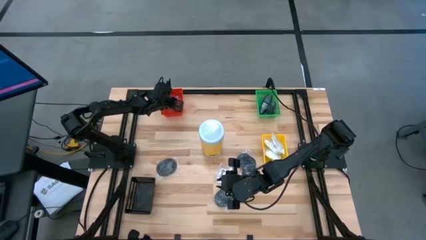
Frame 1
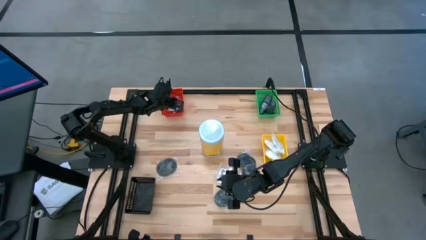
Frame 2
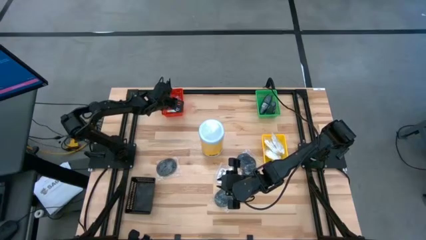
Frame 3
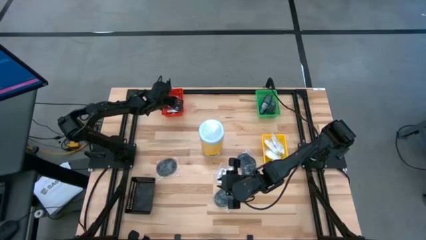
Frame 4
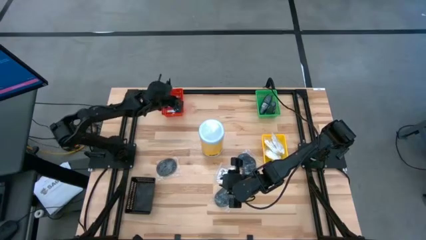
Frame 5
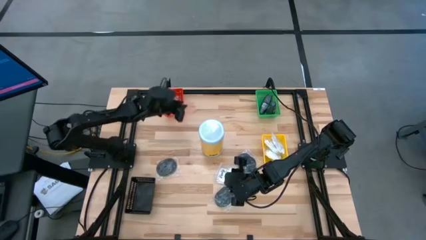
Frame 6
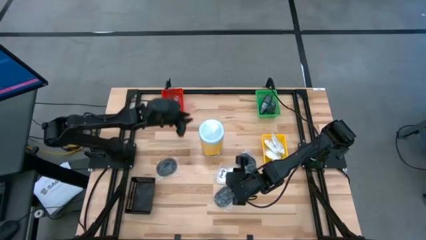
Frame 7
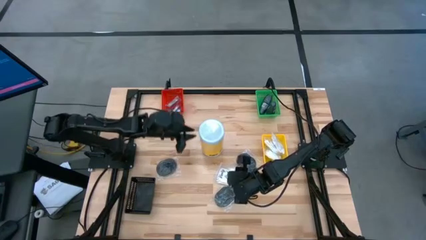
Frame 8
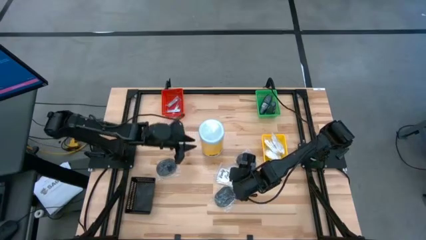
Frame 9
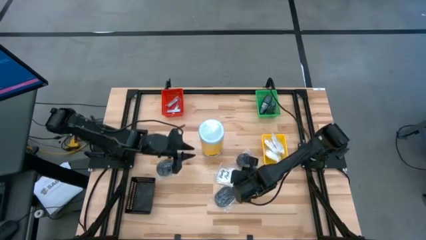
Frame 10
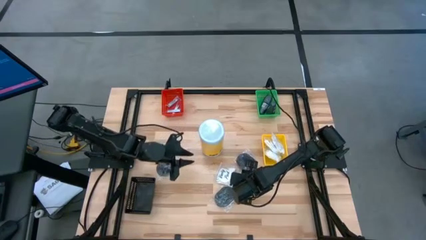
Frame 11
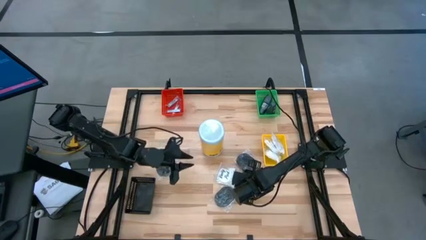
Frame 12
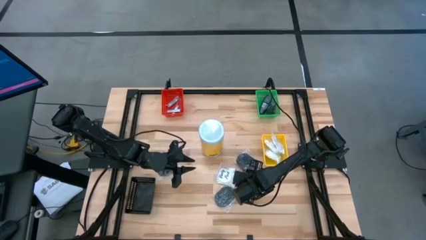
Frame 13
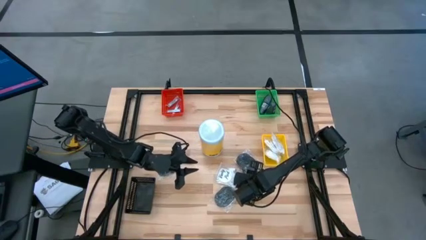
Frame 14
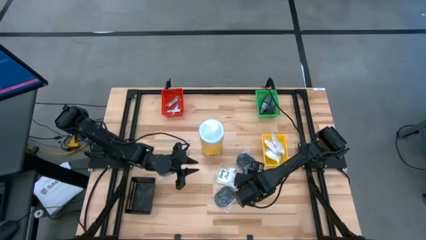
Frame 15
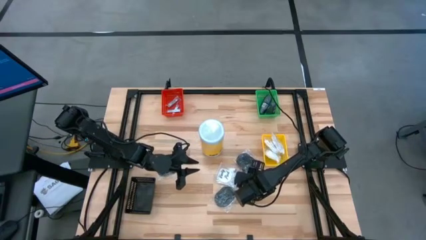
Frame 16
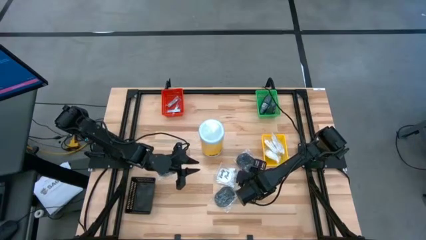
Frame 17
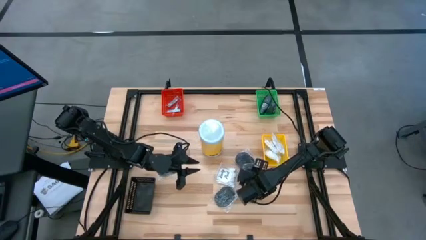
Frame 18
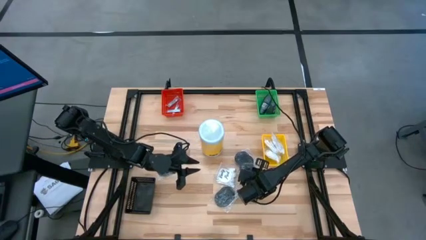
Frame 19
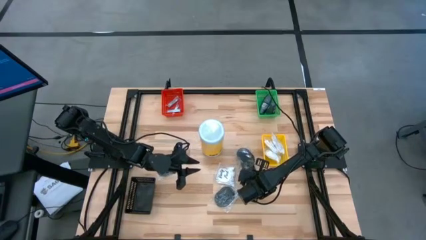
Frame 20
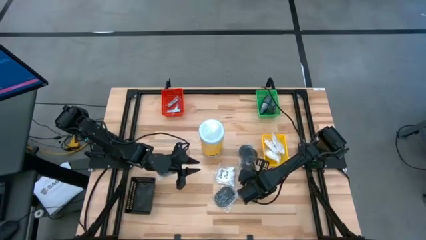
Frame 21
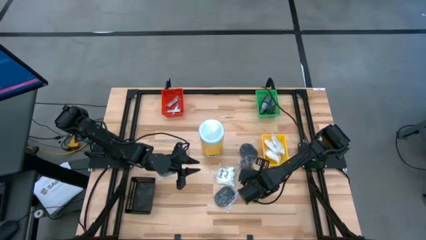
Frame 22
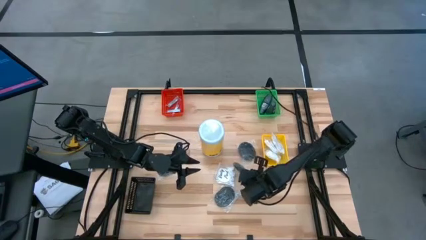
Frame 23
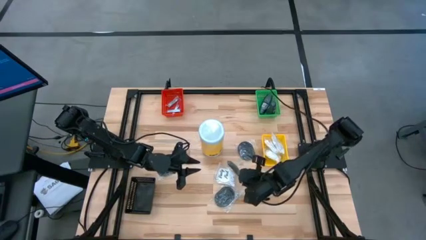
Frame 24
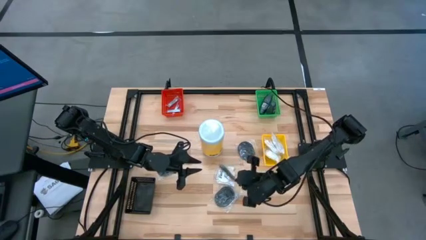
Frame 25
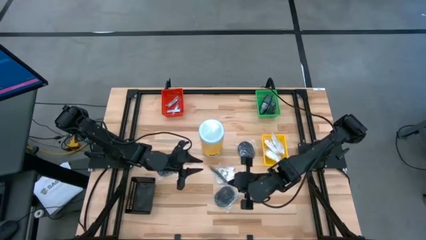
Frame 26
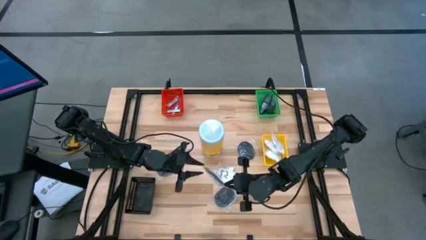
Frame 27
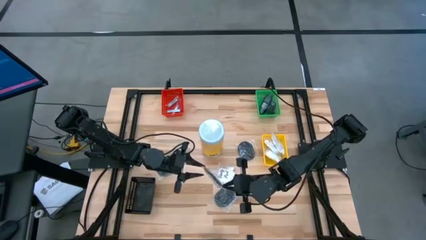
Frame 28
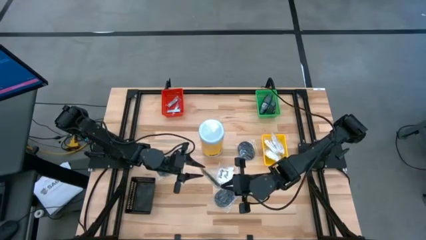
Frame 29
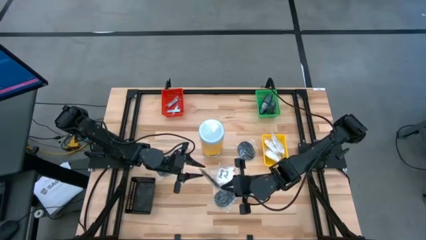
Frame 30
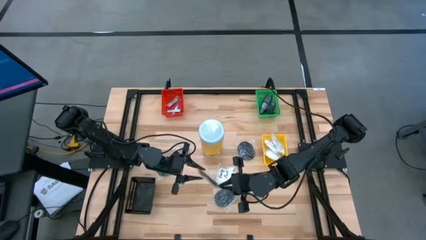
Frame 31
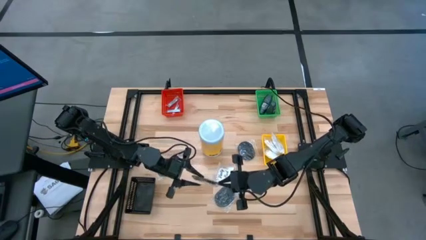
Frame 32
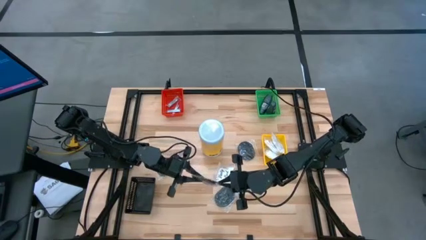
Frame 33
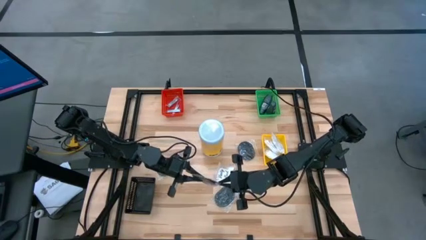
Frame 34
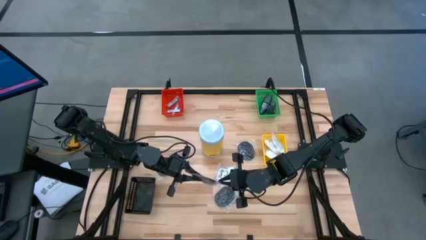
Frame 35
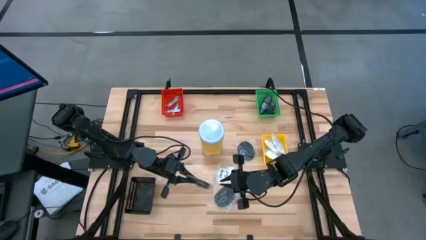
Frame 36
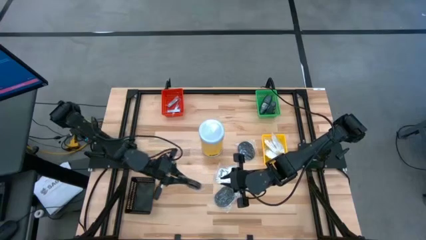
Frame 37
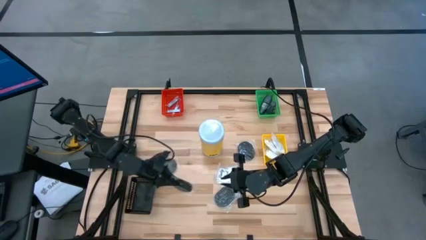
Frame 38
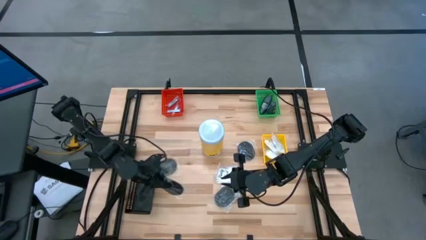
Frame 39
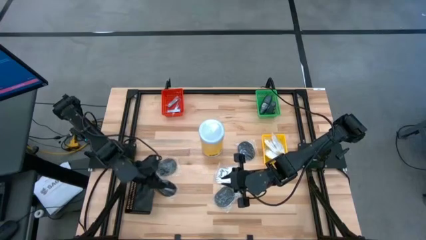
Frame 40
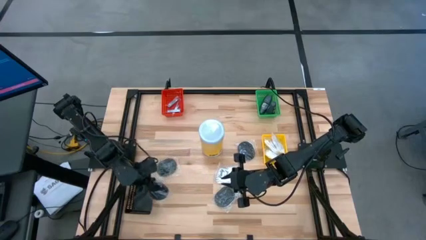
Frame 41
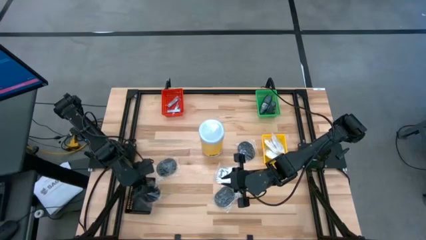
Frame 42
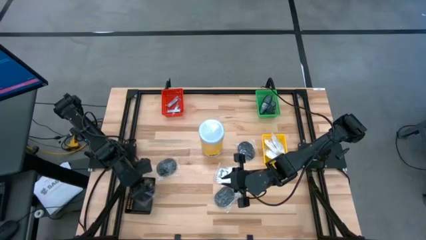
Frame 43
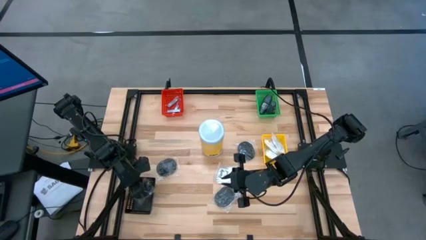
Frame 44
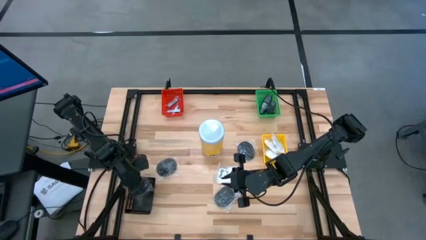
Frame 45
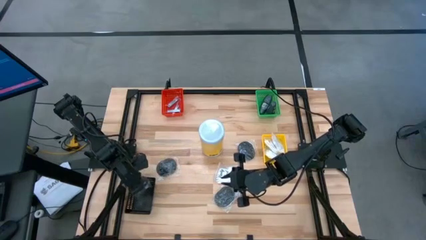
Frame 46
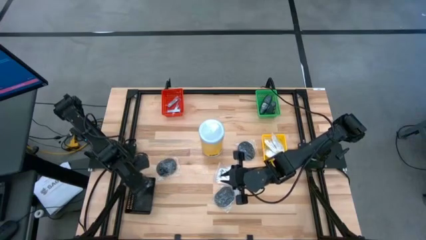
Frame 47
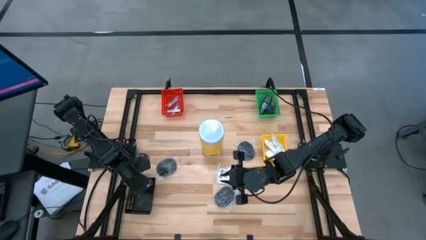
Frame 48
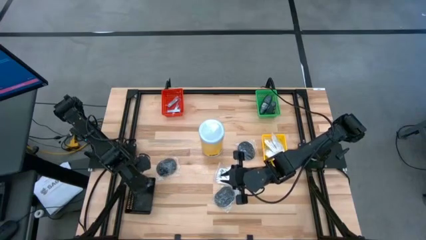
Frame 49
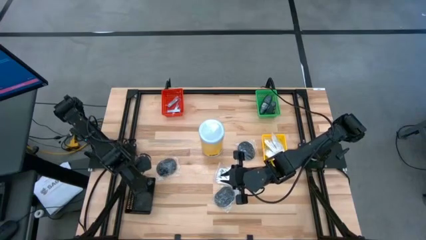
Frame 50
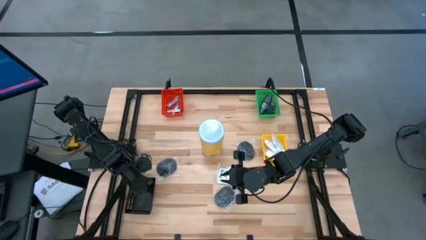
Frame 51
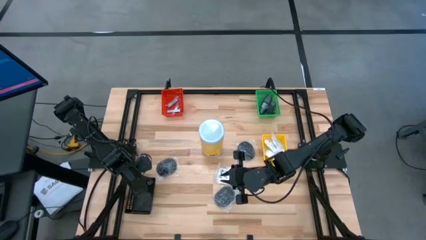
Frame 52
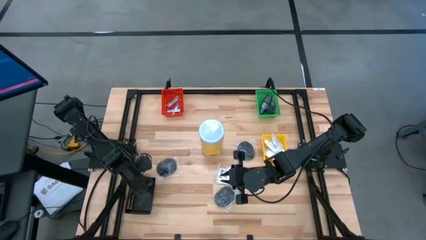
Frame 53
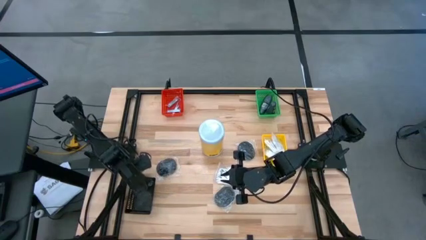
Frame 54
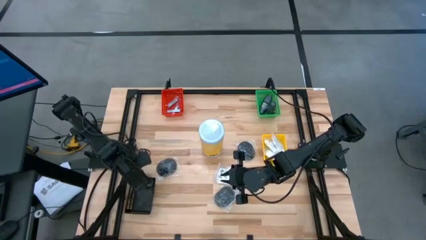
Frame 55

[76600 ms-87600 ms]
Task: Pick & Place Travel size toiletries
Put the black hairbrush into the black bin

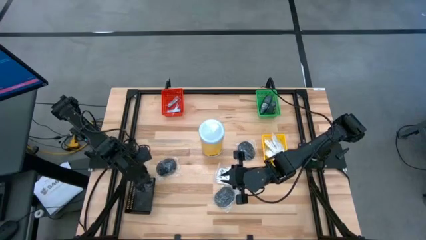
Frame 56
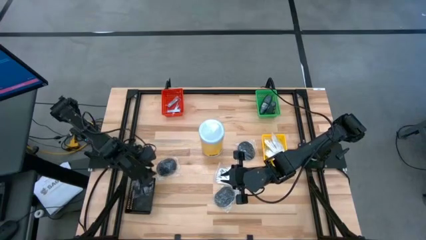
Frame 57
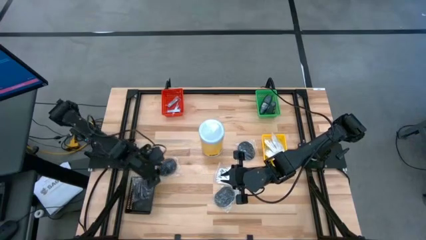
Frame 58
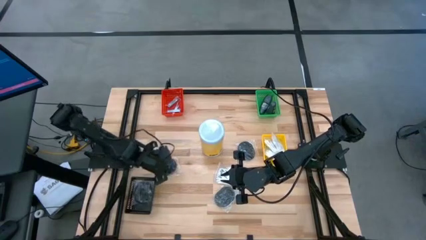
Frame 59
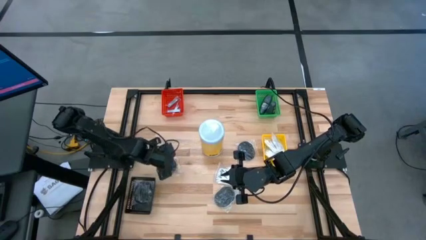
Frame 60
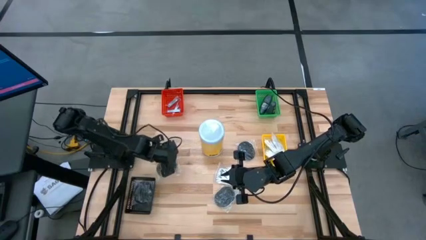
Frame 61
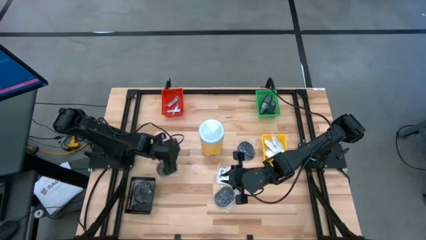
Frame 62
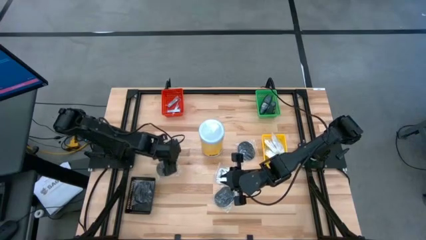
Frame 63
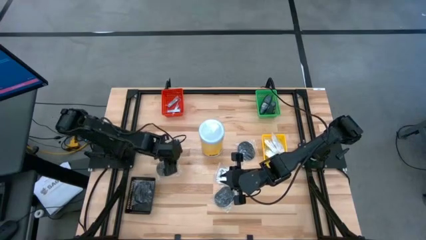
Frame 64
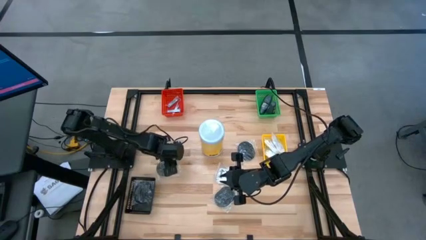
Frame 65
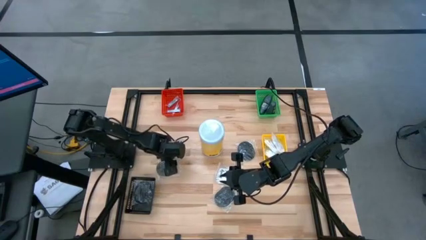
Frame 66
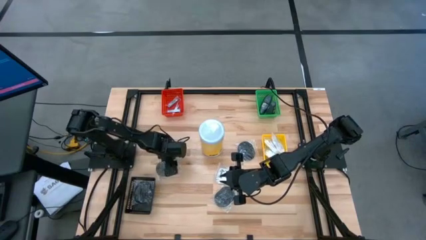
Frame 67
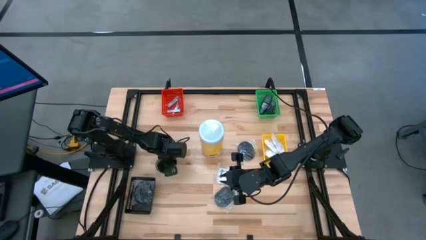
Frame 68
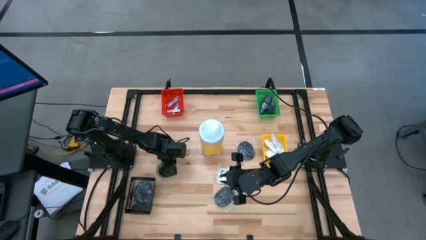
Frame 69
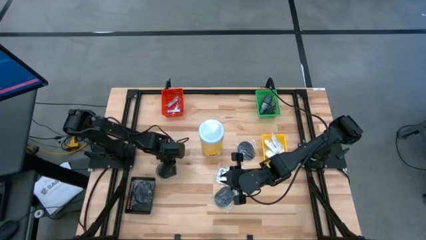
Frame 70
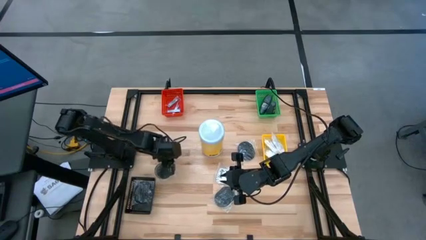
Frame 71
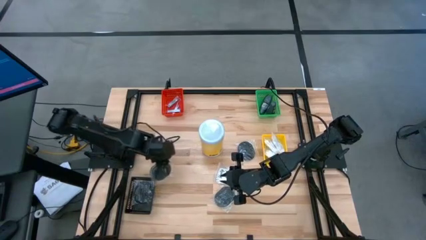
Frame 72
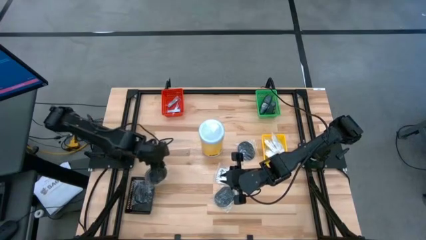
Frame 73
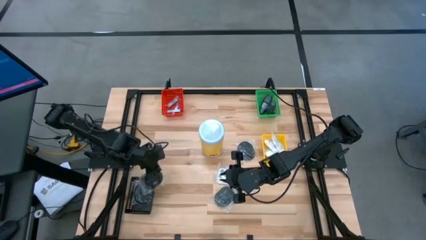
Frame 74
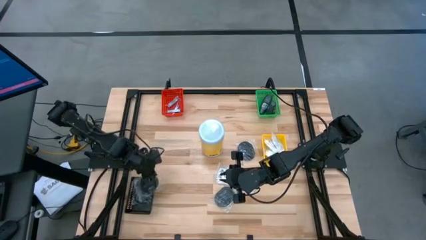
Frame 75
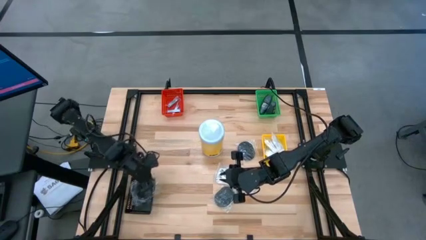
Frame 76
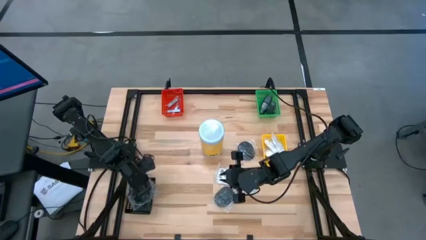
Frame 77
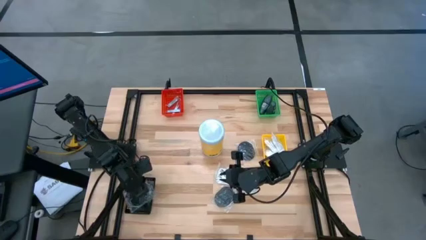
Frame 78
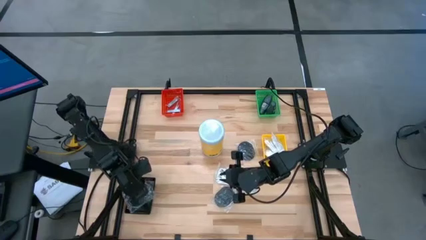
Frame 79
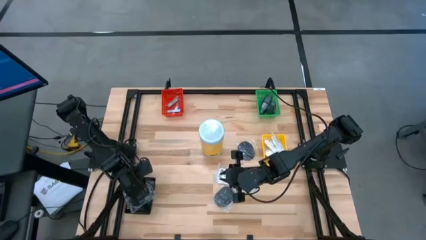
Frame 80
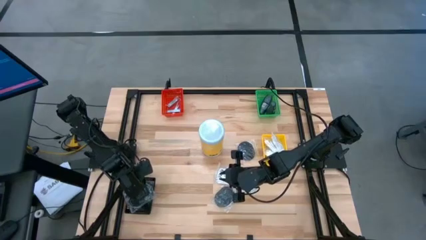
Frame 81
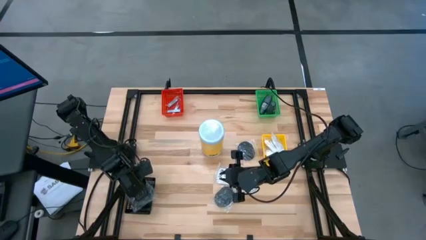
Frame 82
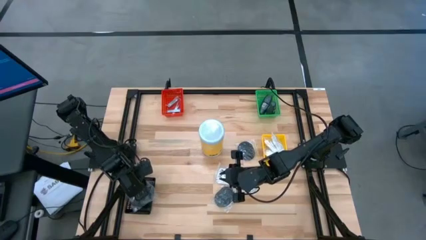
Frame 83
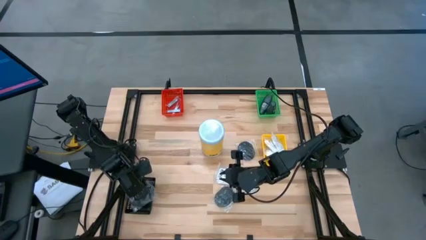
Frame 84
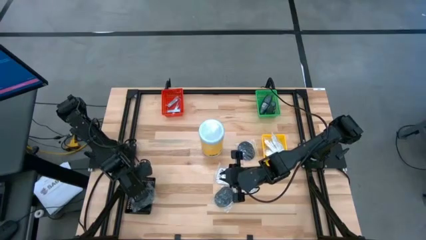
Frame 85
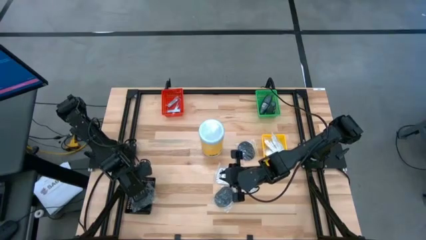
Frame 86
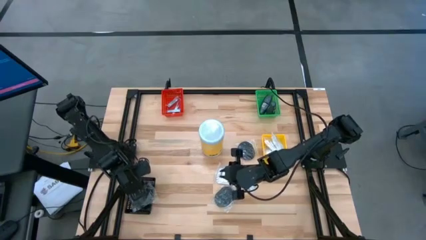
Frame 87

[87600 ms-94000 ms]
Put the black hairbrush into the black bin
